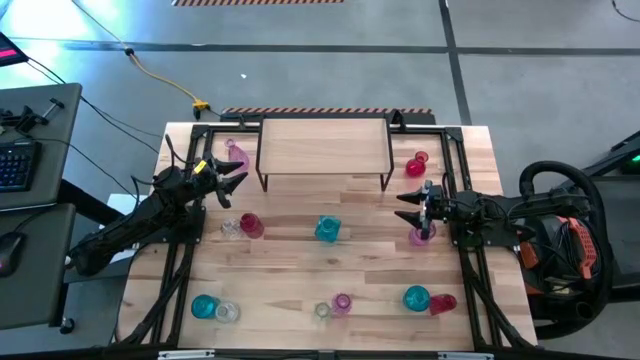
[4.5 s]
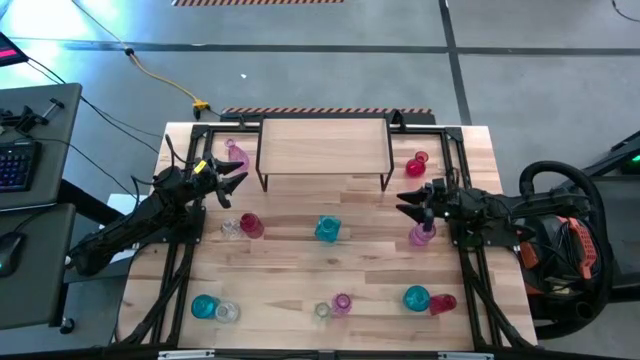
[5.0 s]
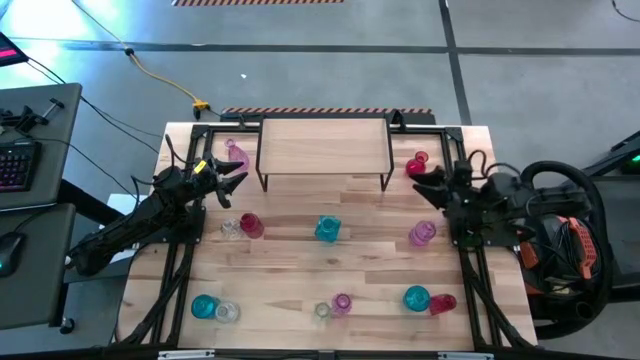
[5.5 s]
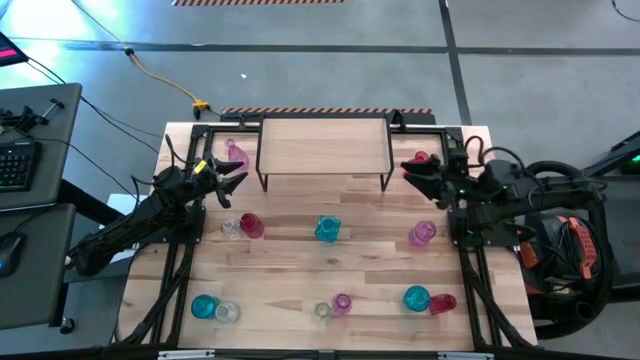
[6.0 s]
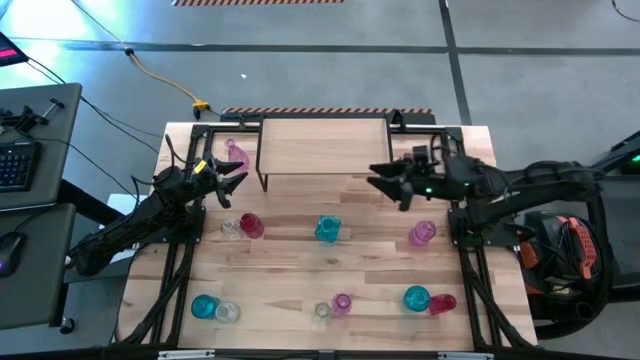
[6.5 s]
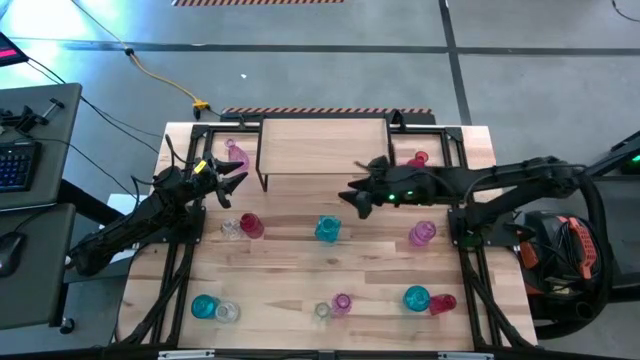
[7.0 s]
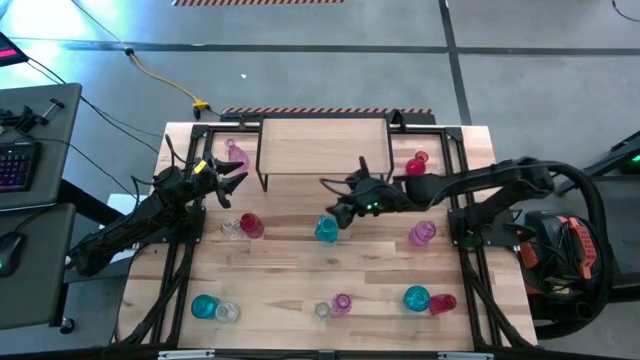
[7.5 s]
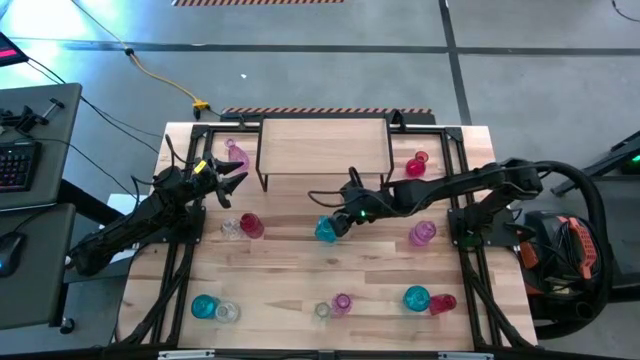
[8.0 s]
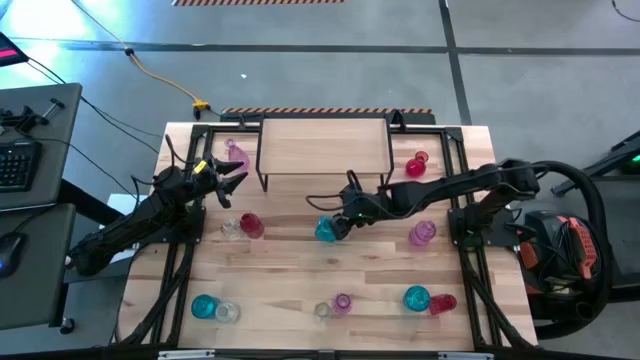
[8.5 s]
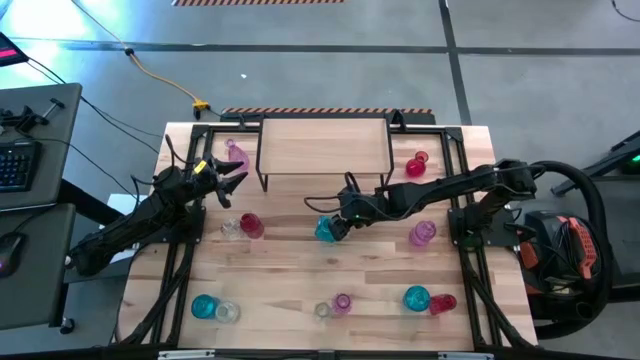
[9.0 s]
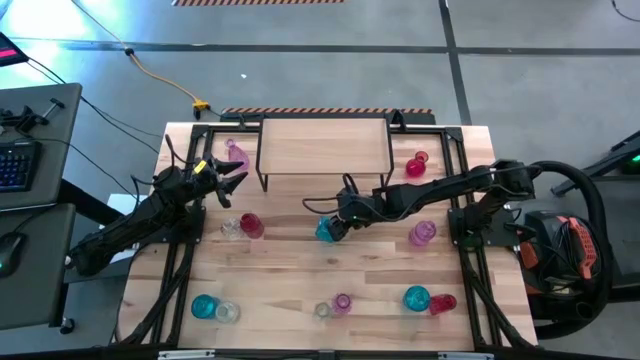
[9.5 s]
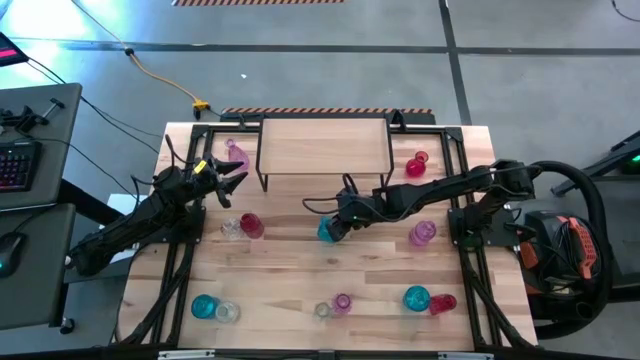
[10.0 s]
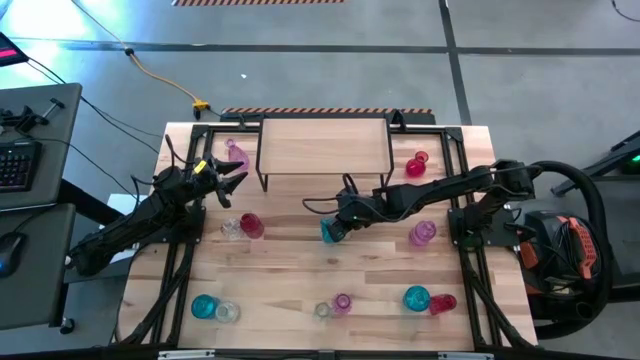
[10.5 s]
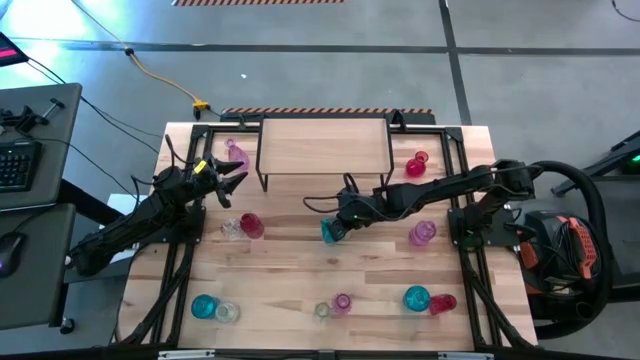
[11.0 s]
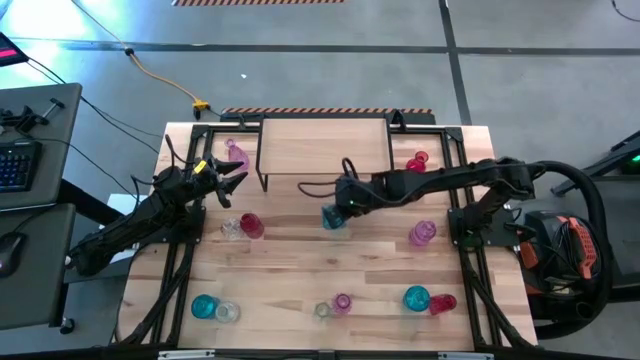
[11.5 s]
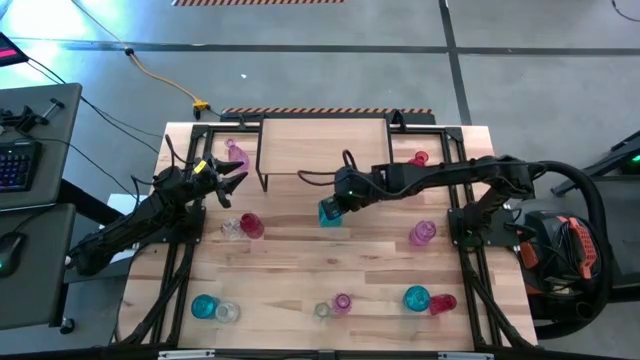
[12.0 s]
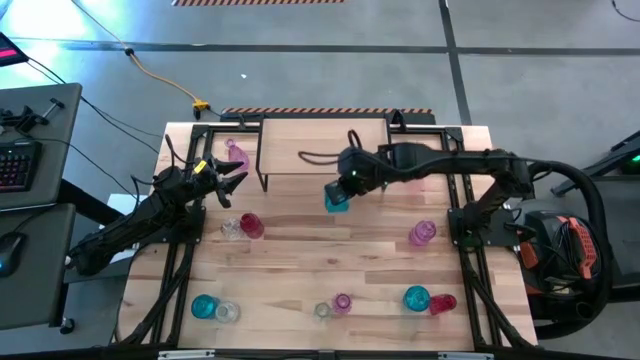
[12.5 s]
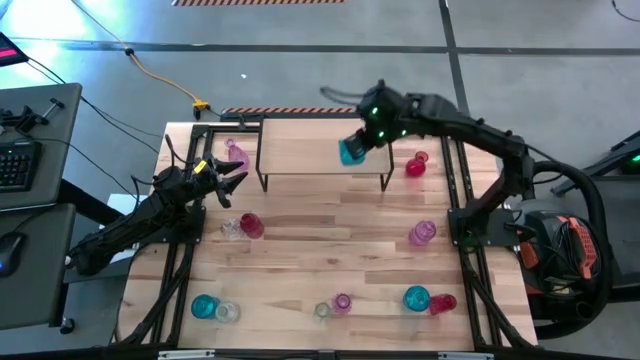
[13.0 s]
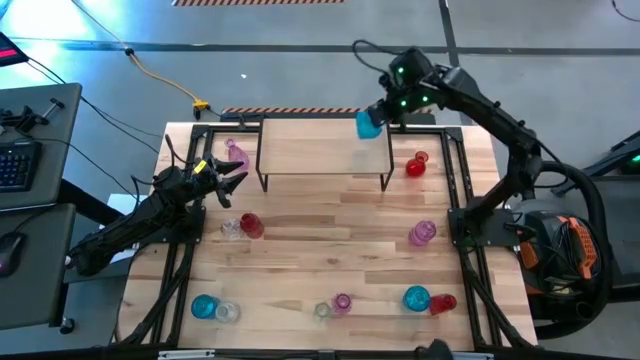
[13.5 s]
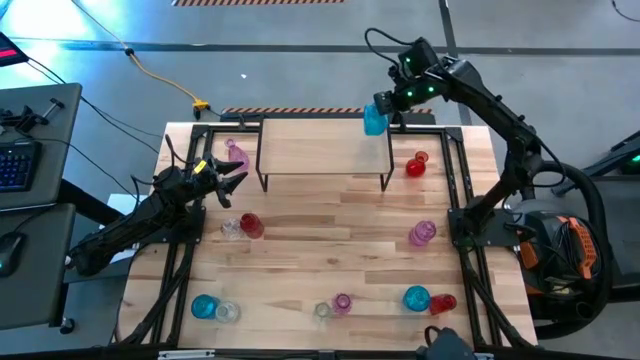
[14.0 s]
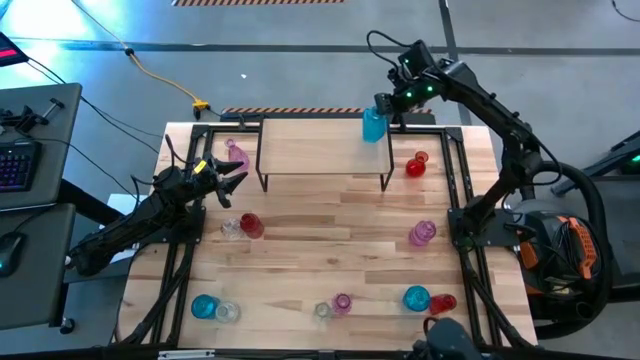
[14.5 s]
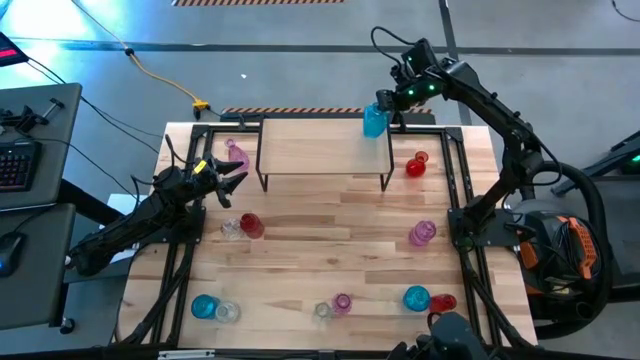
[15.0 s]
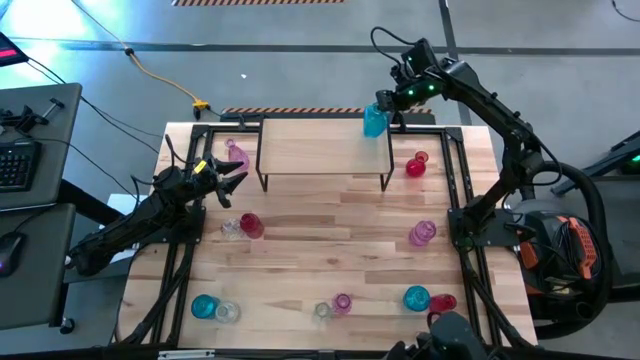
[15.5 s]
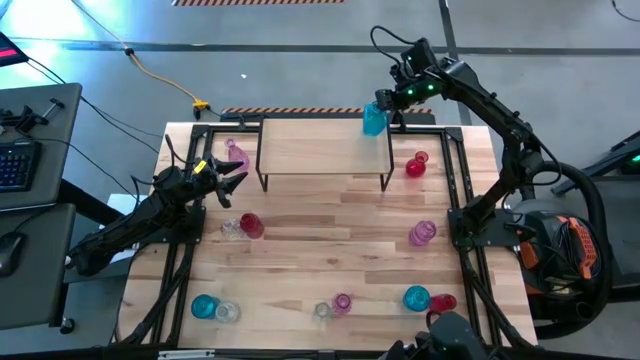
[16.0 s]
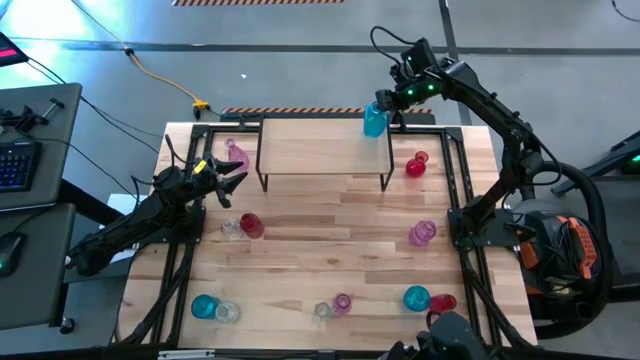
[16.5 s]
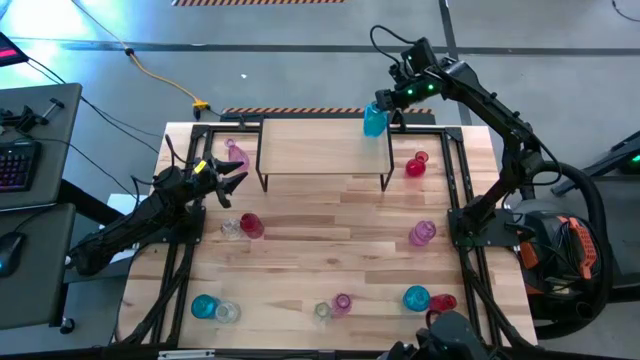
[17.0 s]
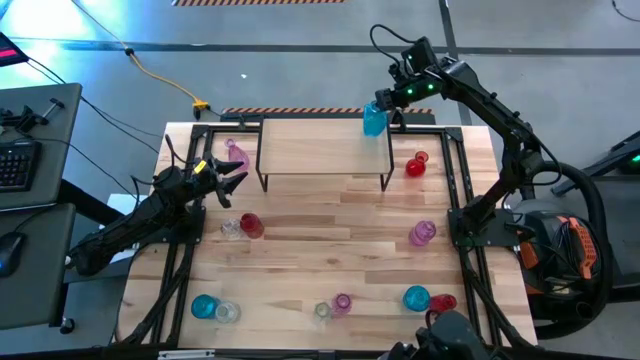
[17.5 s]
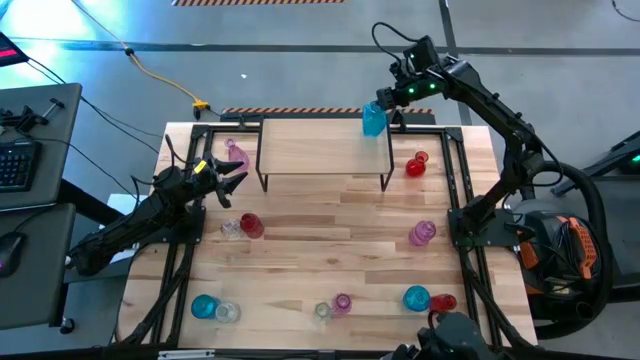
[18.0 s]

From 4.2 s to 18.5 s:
Task: sort vases onto shelf
Put the top blue vase on the shelf

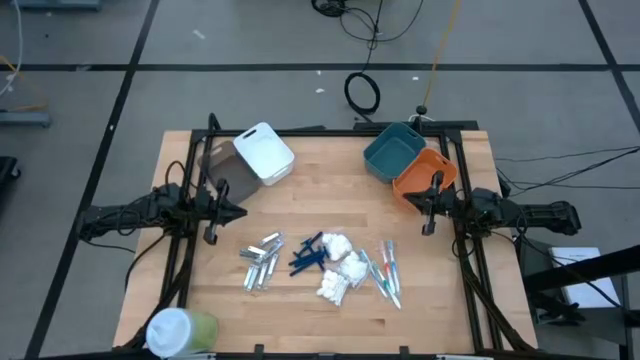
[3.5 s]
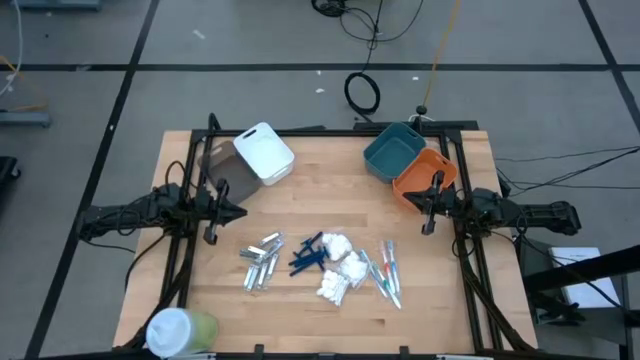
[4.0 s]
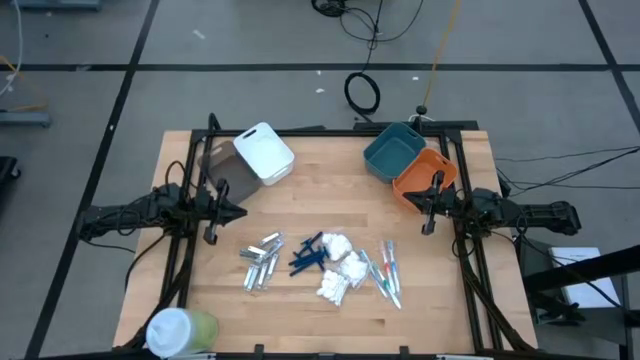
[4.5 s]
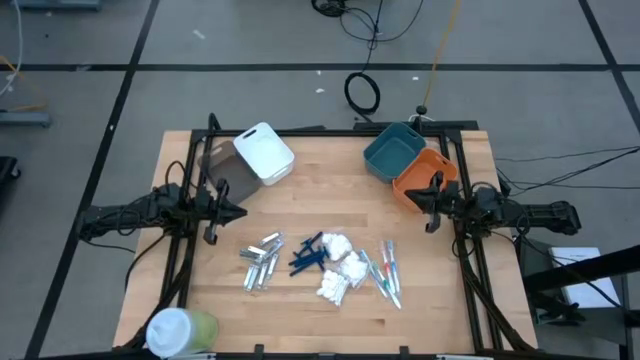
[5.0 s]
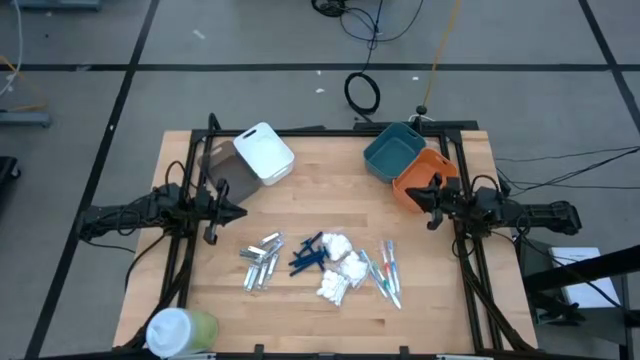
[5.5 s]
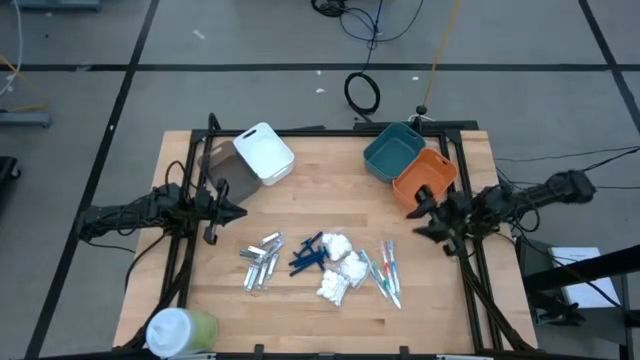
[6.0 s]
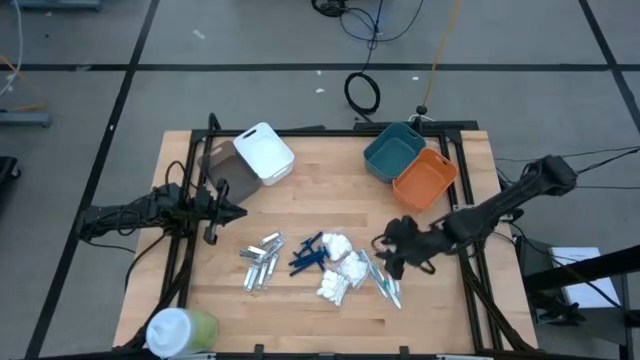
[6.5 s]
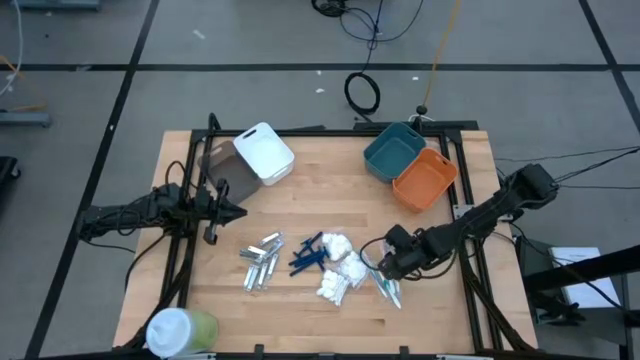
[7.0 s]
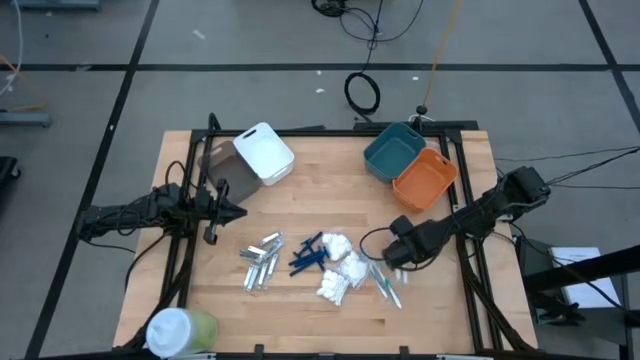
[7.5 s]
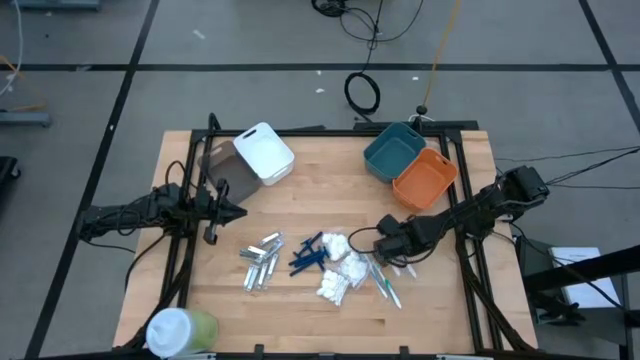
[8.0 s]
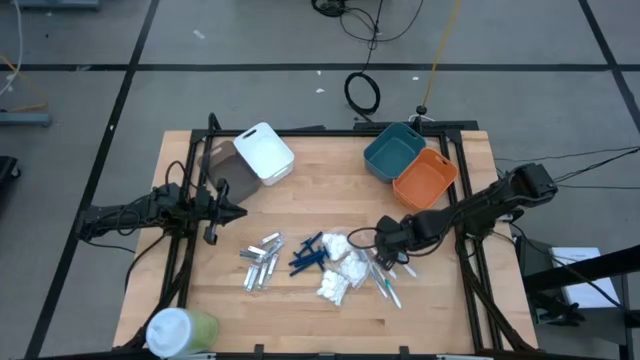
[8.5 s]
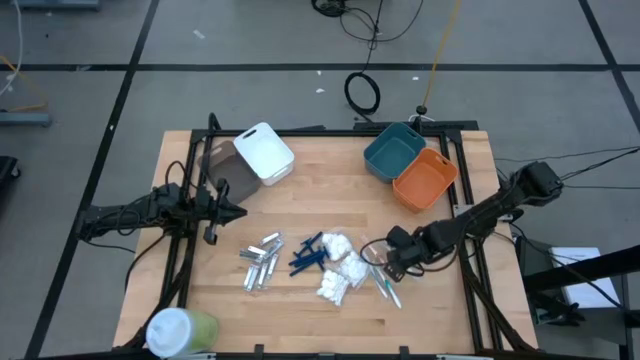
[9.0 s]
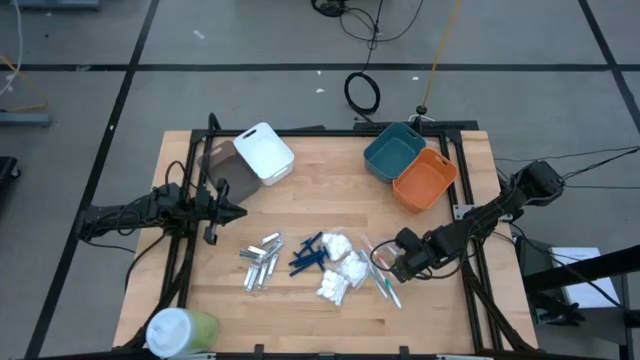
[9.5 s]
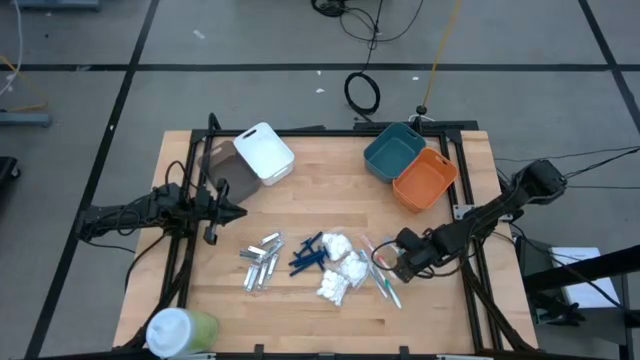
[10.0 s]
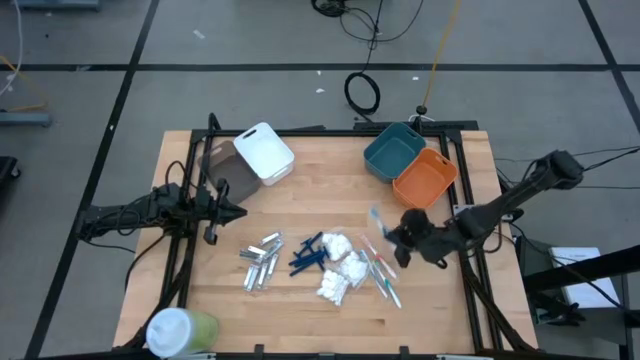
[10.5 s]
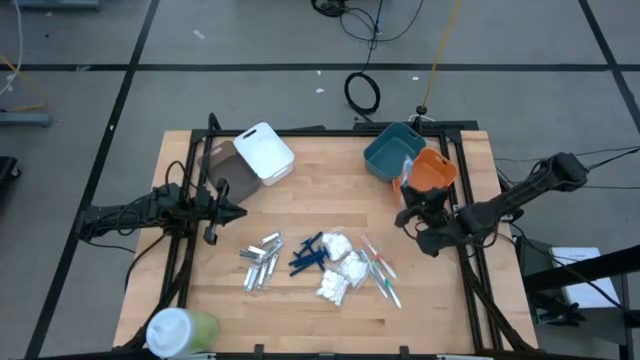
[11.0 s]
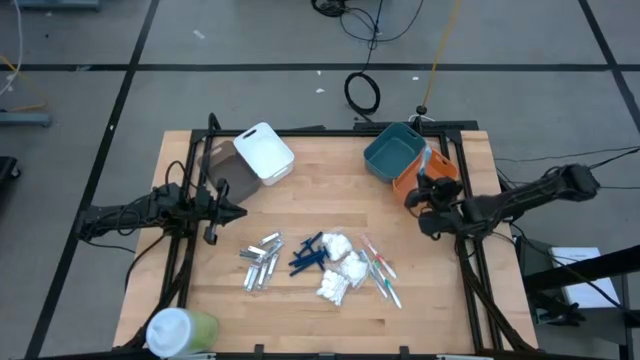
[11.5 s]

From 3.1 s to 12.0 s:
Task: Pick & Place Travel size toiletries
Put the right blue toothbrush into the orange bin
